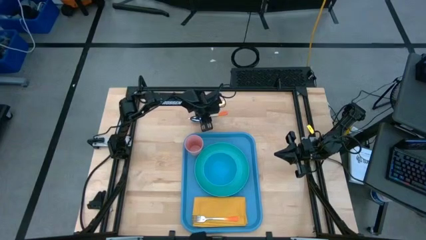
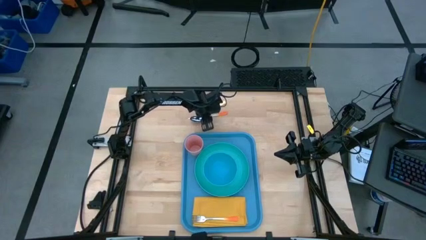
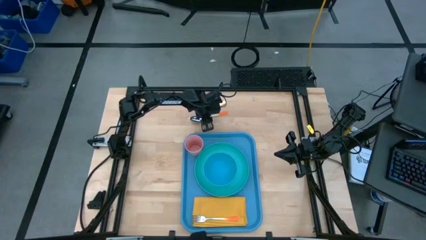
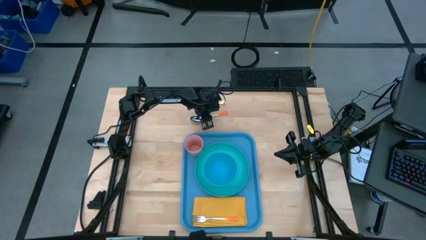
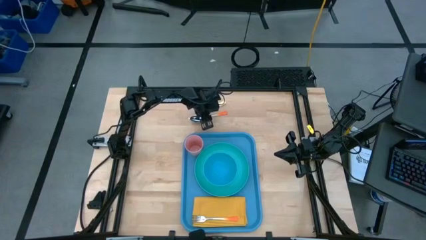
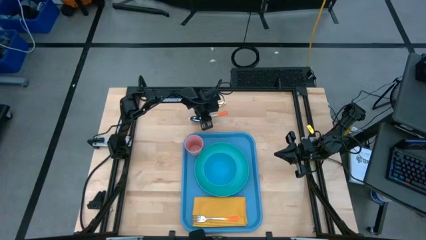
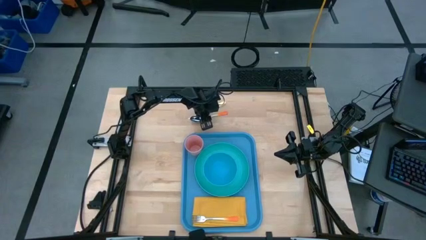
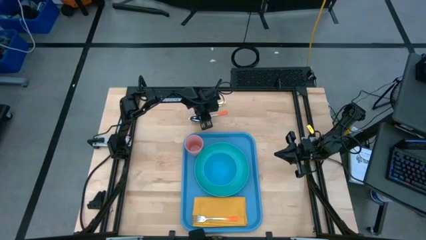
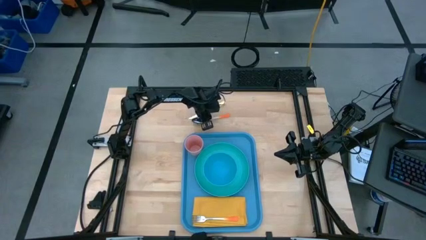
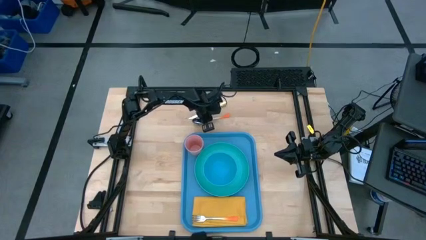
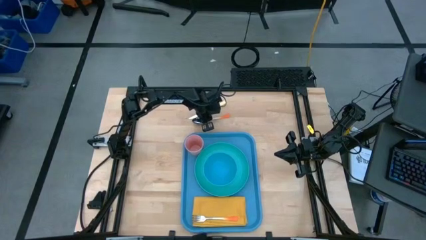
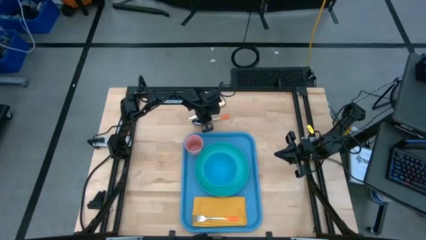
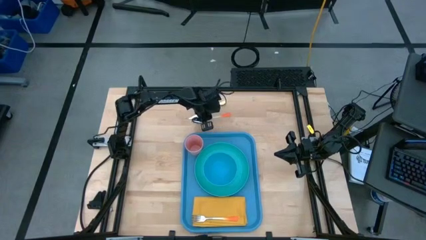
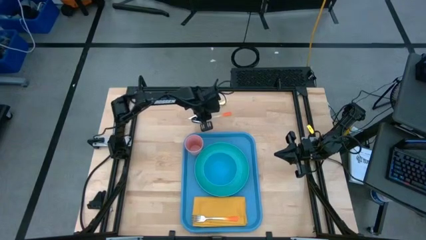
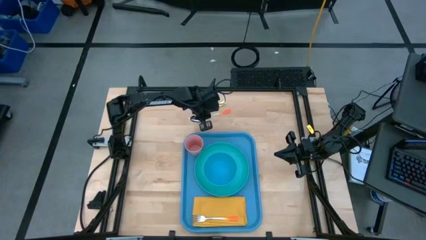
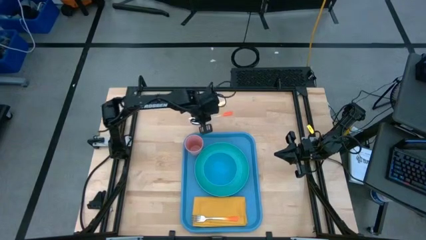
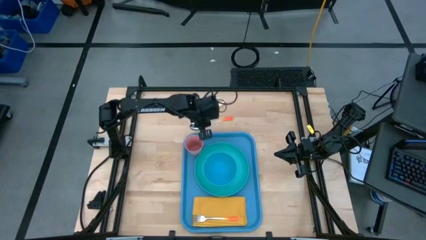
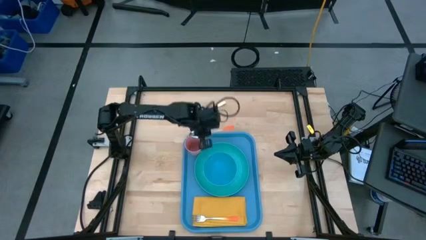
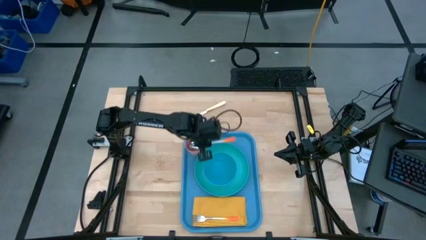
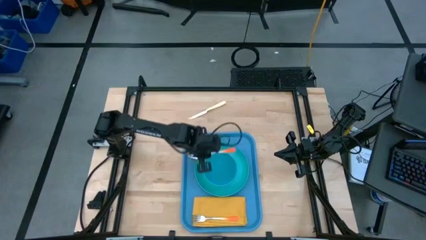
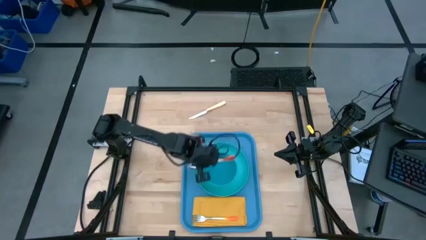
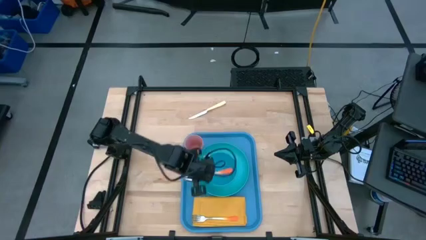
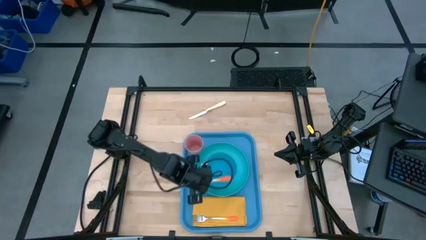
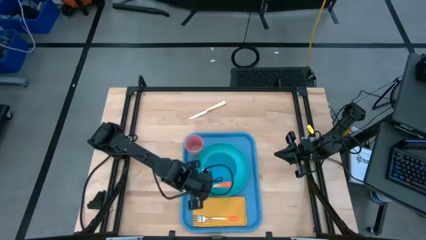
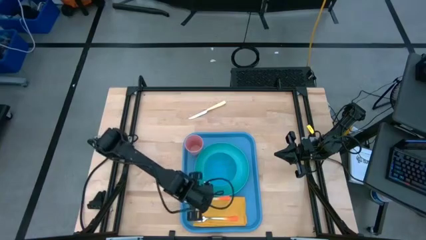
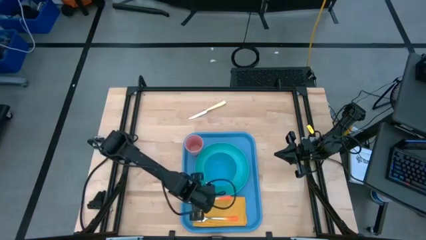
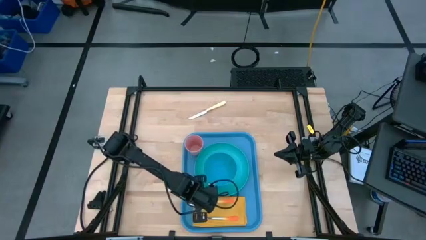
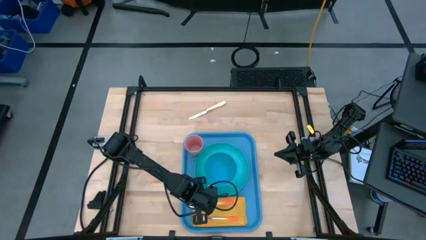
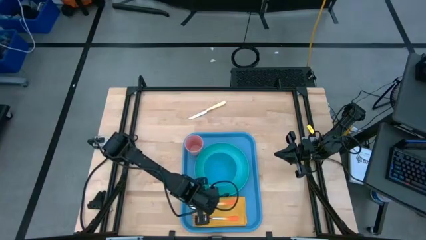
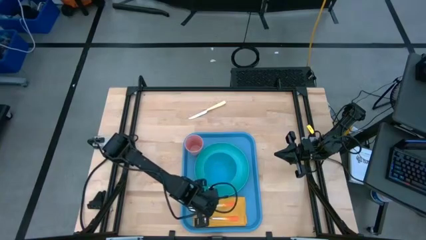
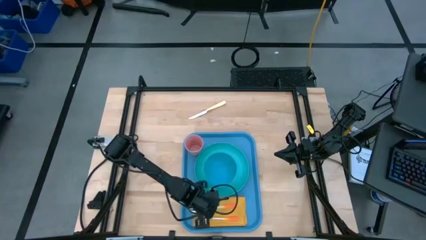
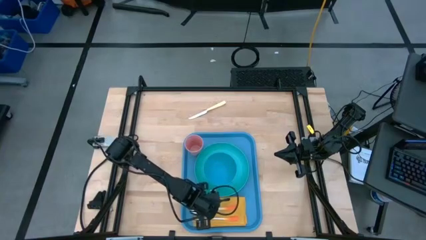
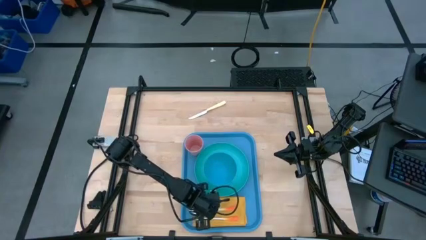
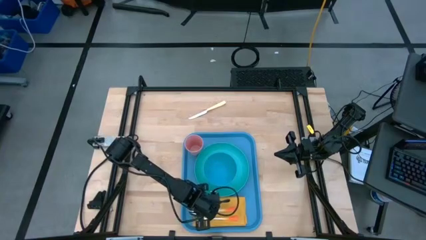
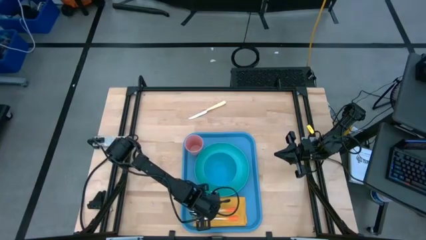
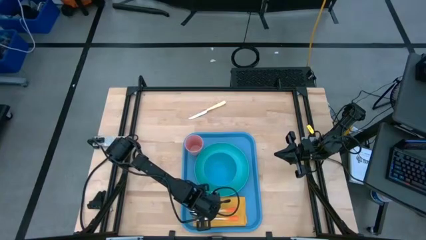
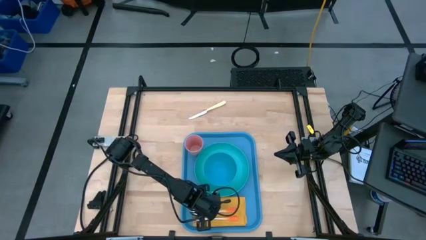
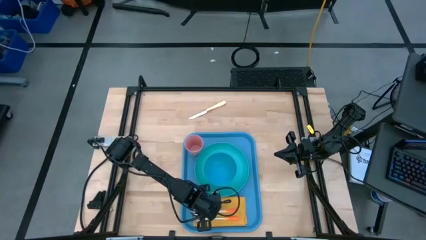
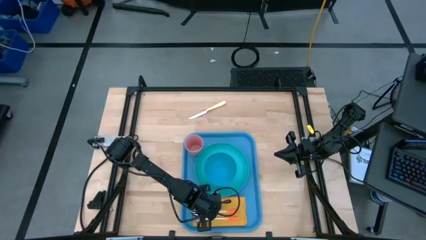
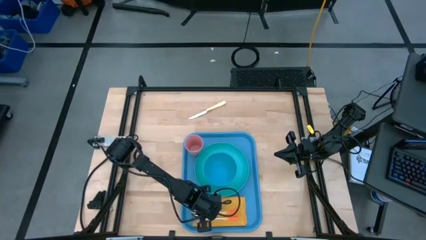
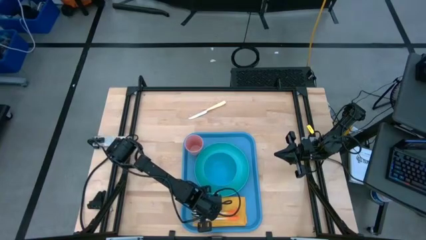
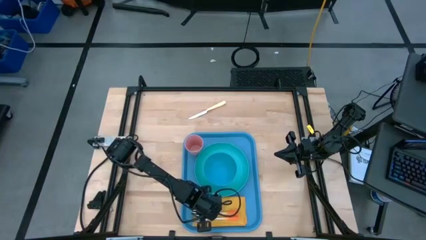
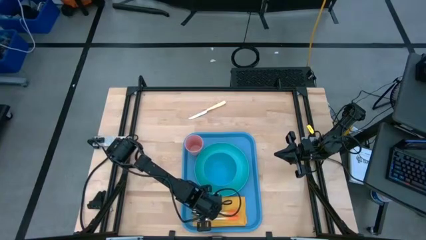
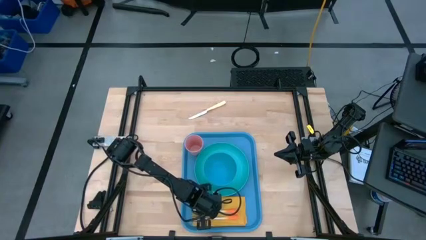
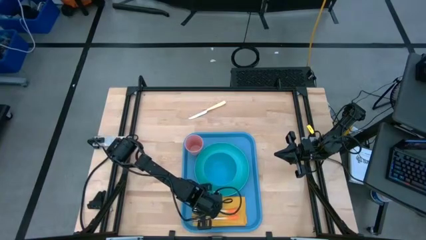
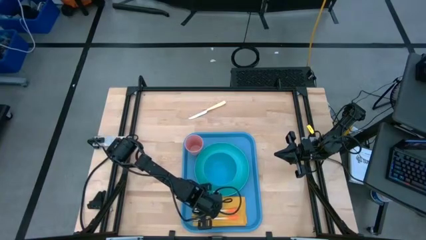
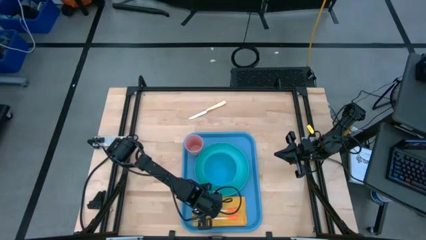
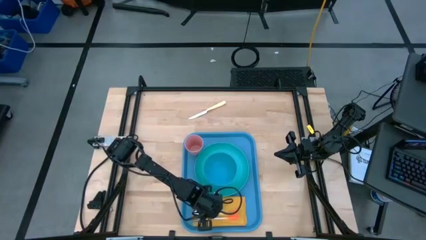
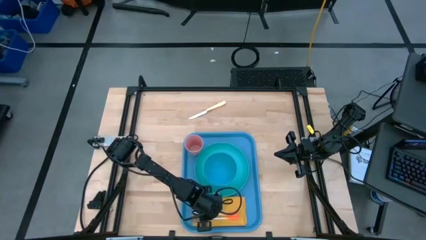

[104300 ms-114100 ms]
Task: Set up tray
Put the orange spoon on the yellow table napkin to the top of the orange fork
